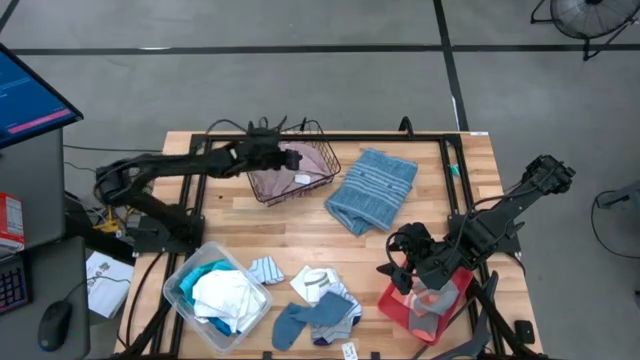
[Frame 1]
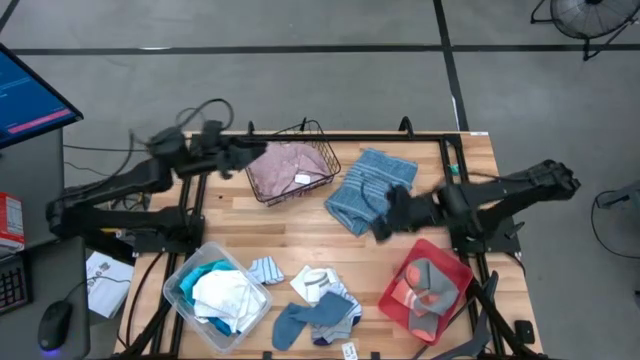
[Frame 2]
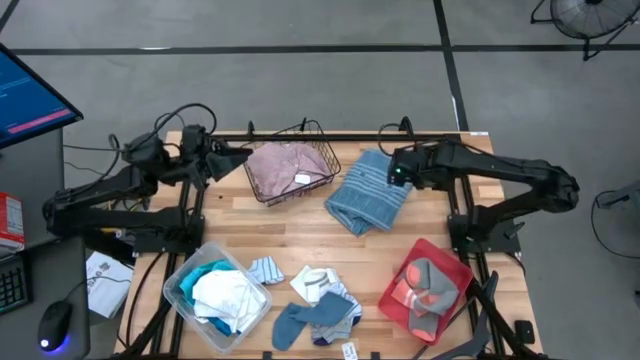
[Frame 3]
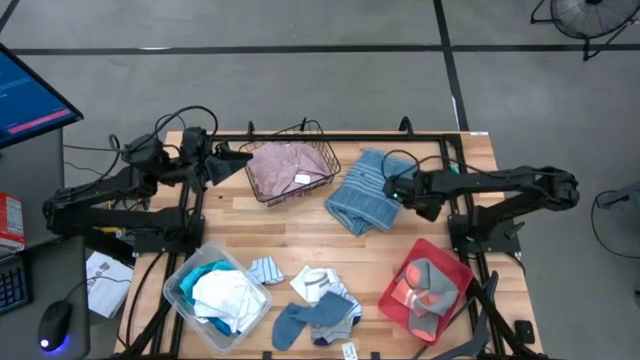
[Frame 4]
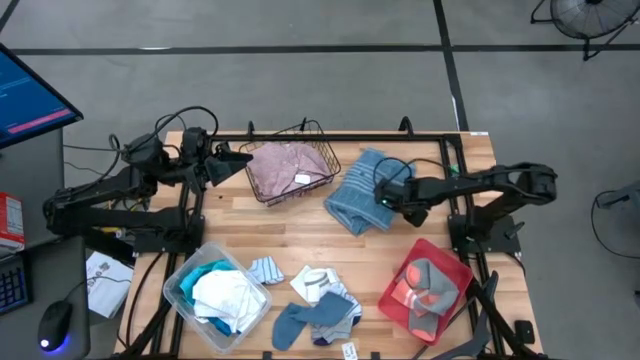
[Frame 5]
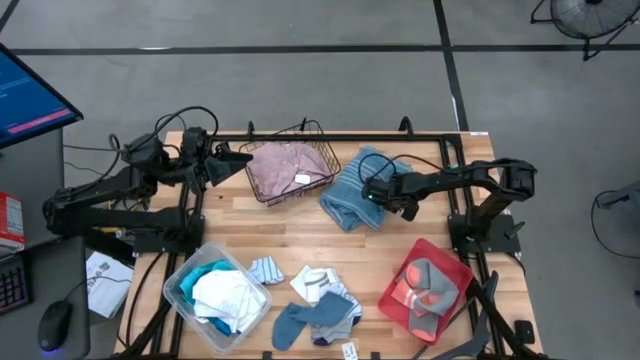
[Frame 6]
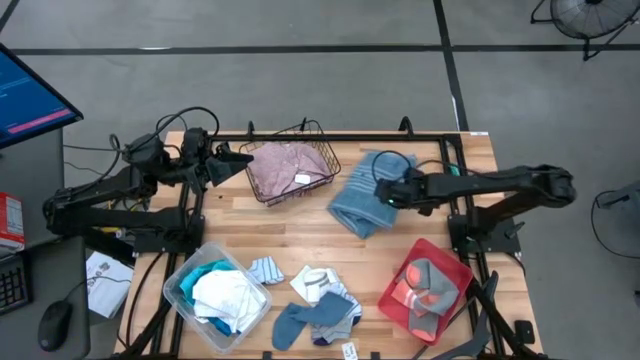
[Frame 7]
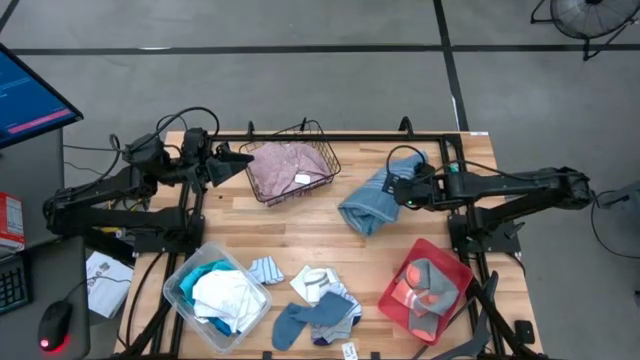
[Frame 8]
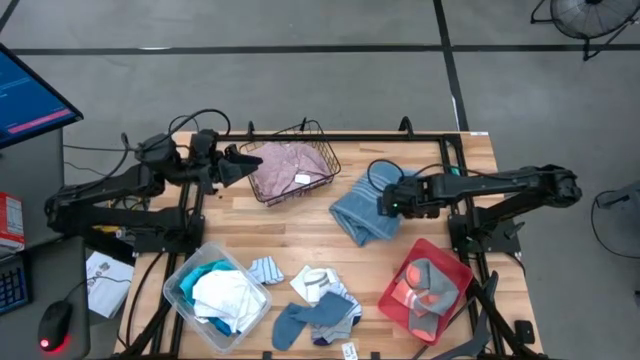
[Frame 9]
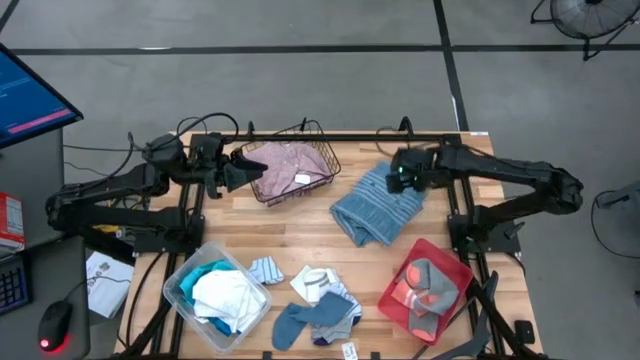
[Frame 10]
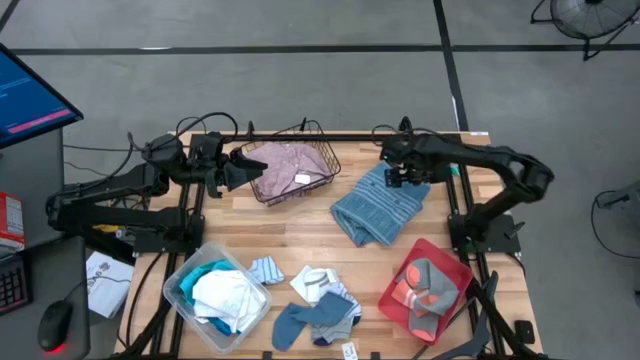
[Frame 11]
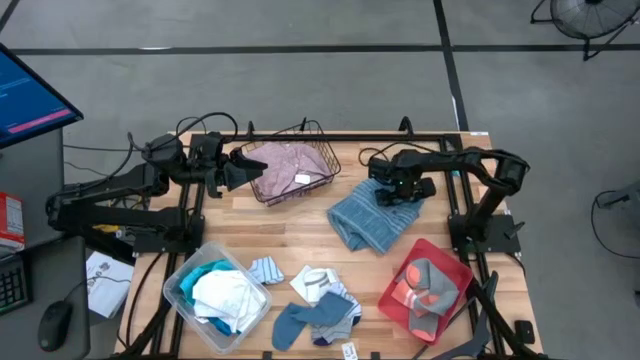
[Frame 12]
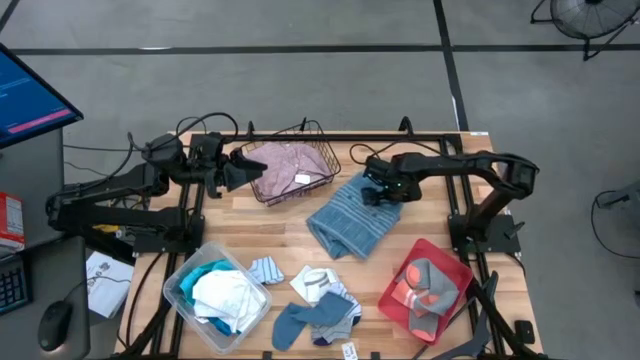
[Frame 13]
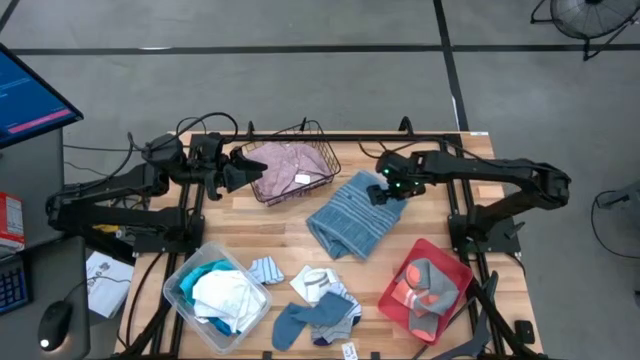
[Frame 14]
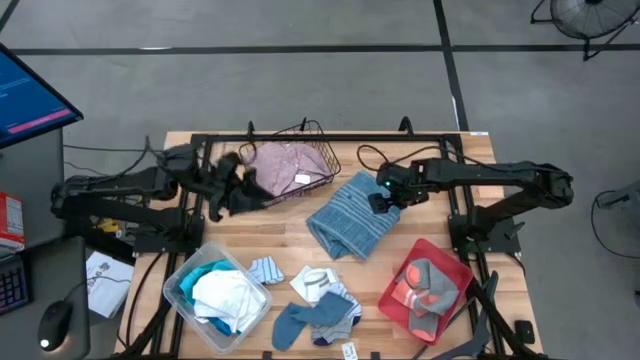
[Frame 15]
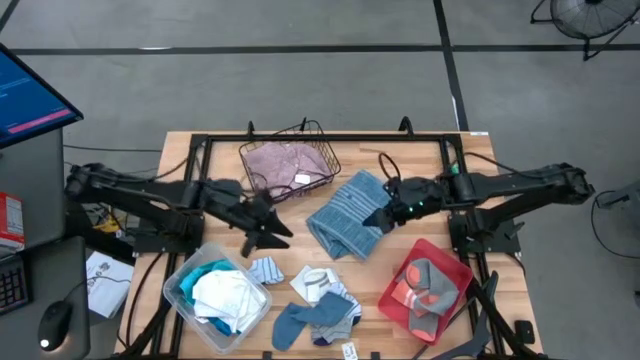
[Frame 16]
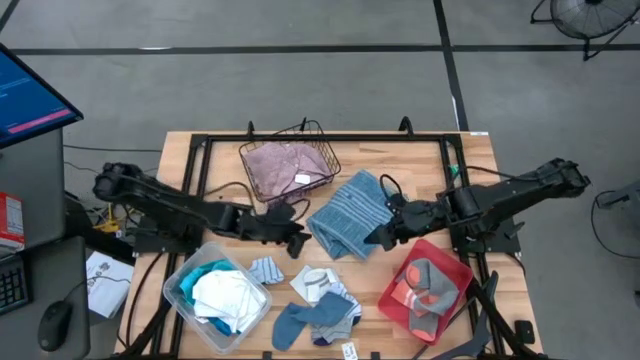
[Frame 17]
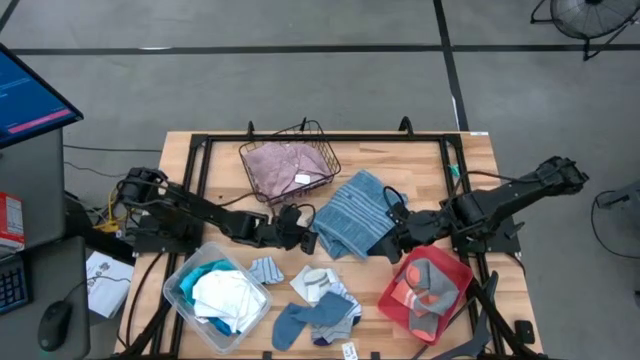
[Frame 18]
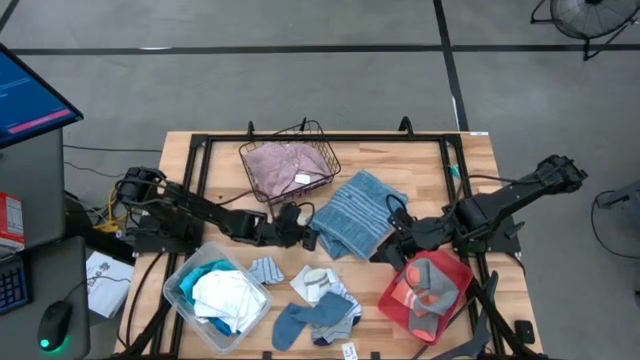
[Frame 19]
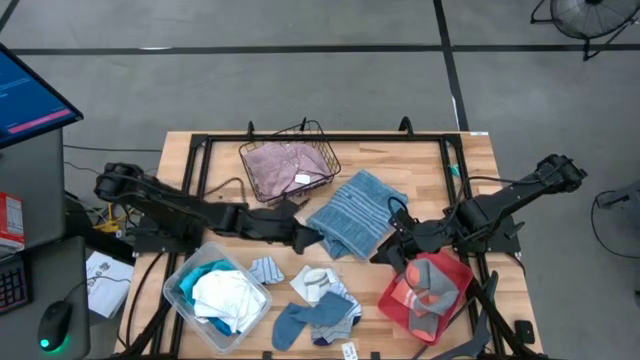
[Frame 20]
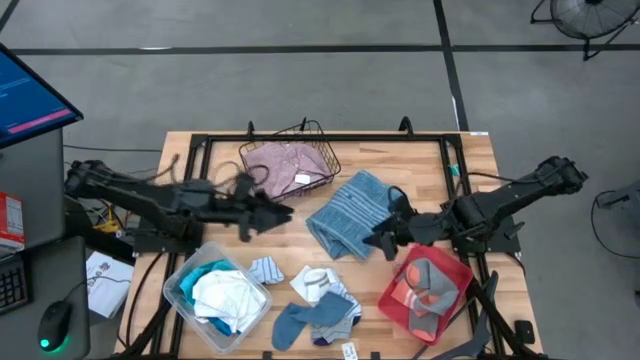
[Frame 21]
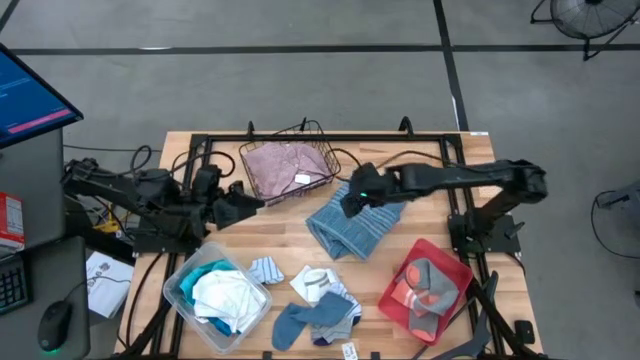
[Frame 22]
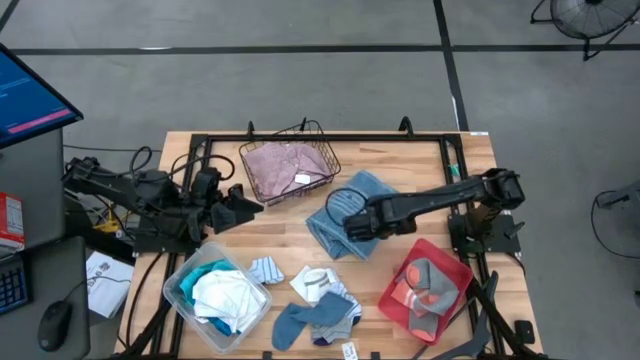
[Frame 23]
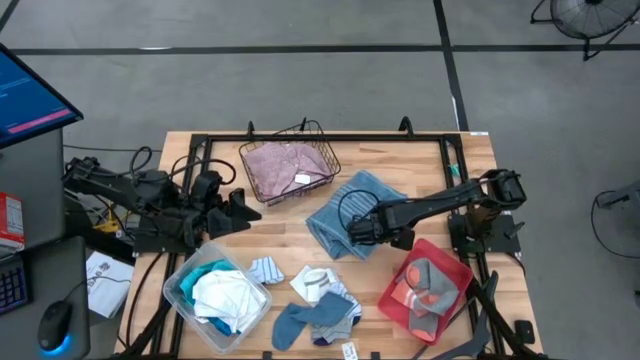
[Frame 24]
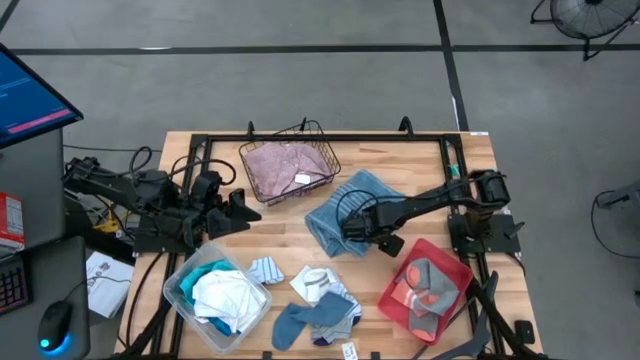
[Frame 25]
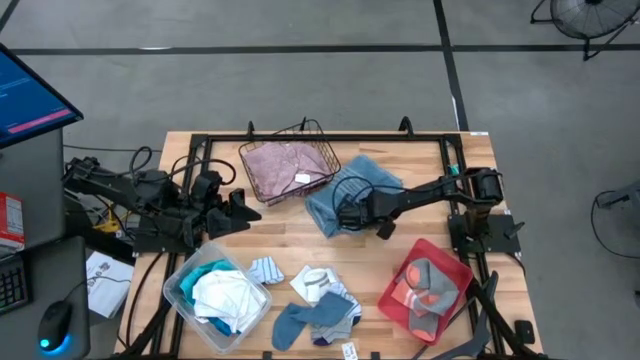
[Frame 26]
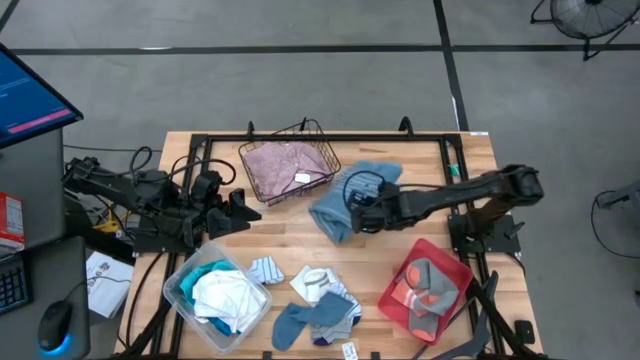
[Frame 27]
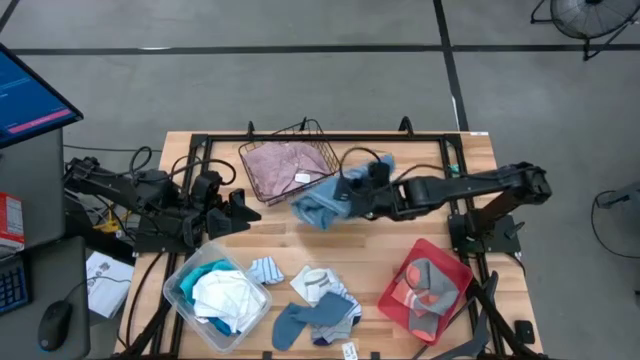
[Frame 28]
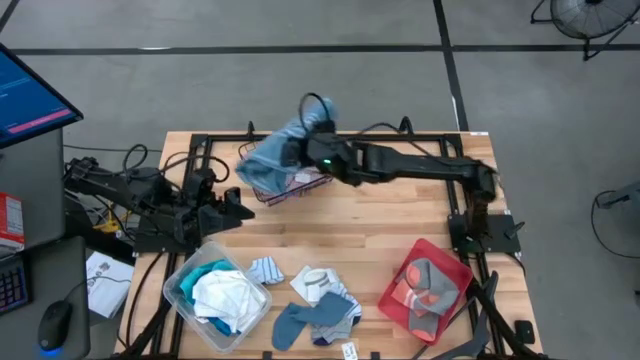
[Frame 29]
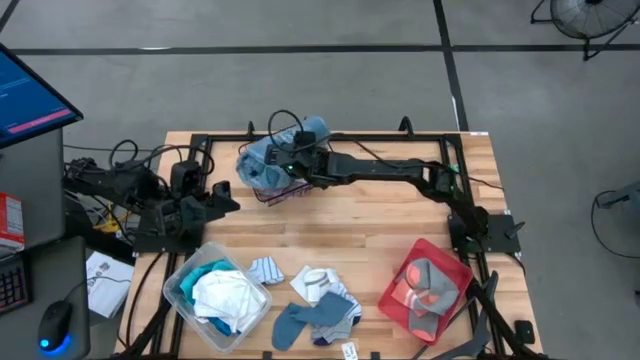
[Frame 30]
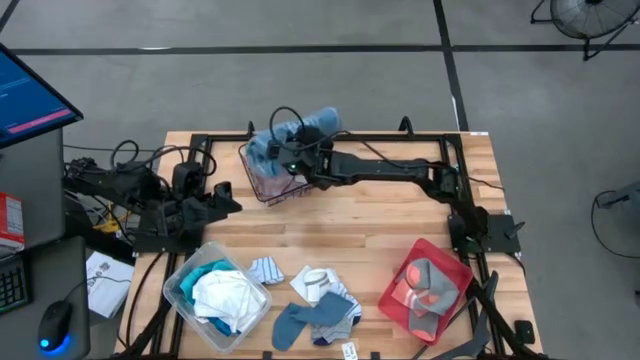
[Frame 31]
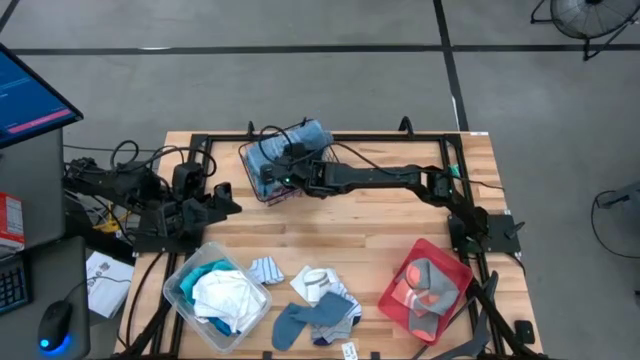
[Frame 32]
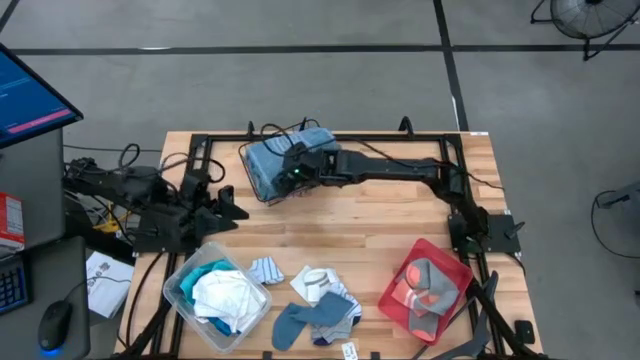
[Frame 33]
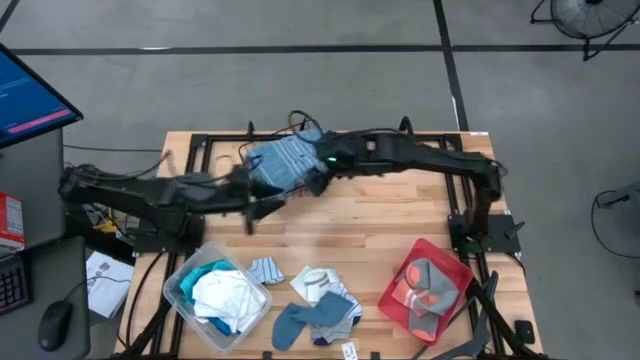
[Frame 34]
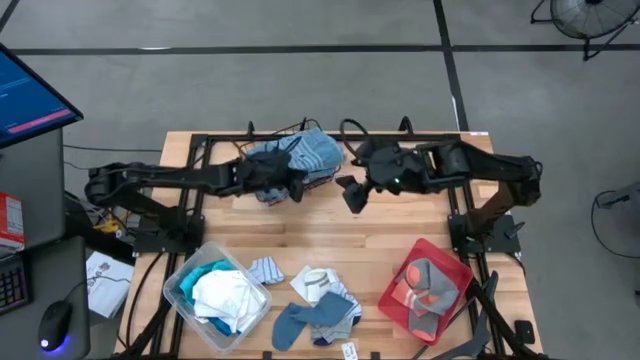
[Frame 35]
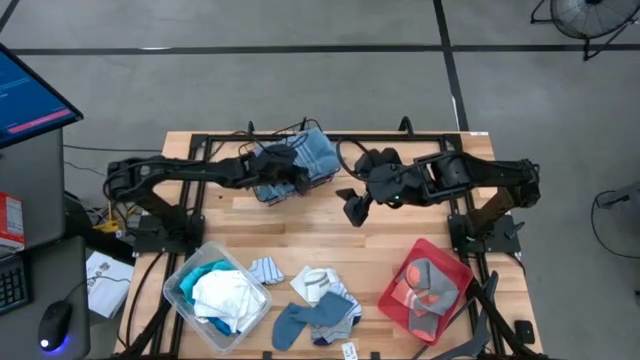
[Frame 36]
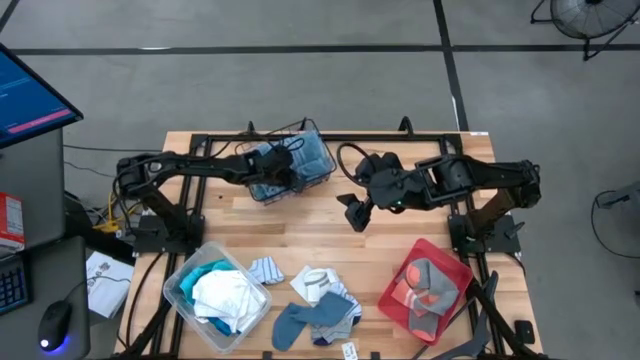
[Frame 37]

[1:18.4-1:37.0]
Task: Pick & Place Cloths
Put the blue polo shirt into the black mesh basket

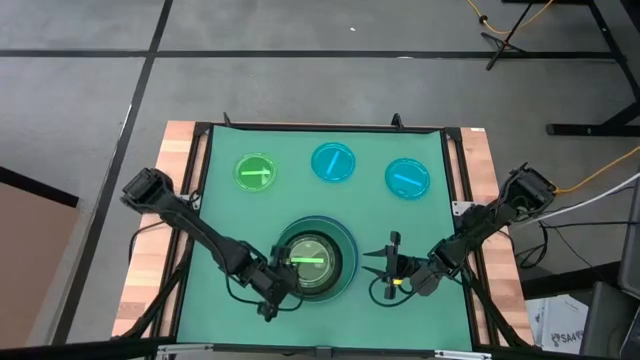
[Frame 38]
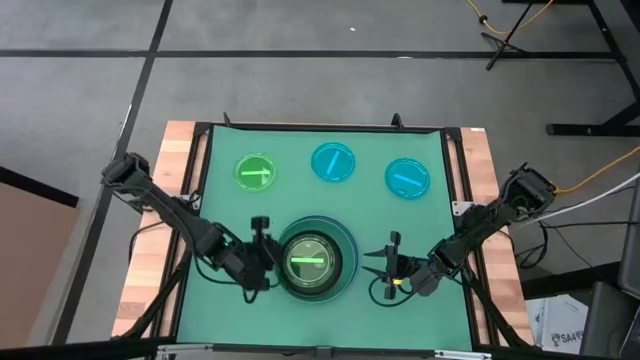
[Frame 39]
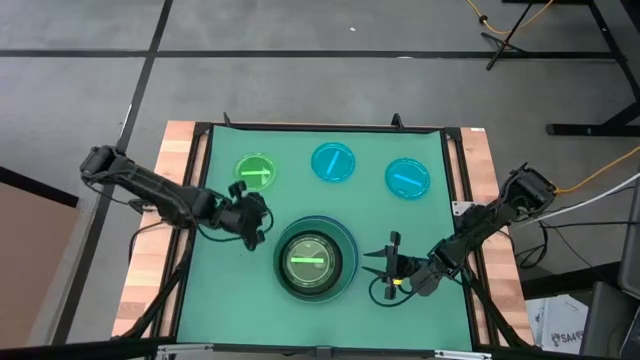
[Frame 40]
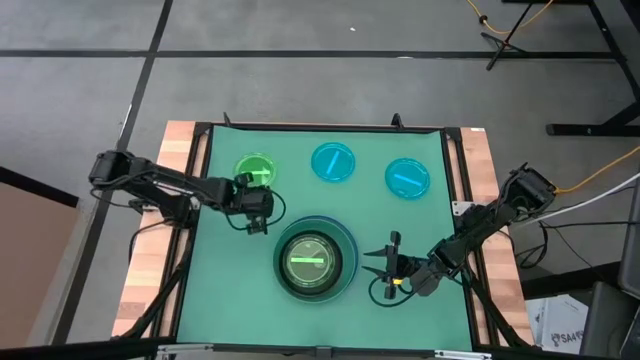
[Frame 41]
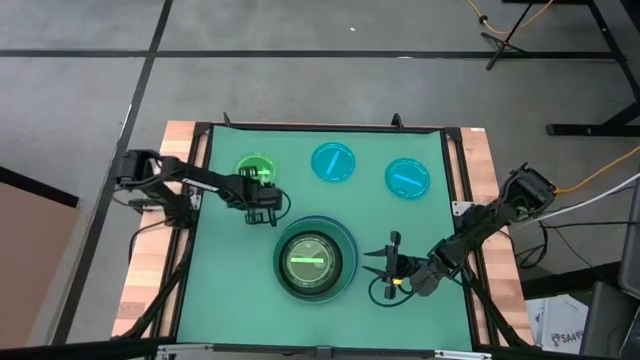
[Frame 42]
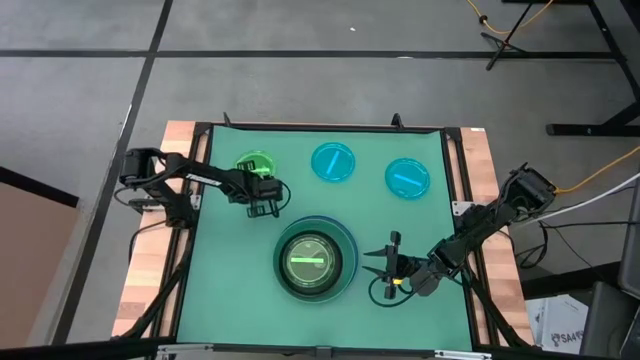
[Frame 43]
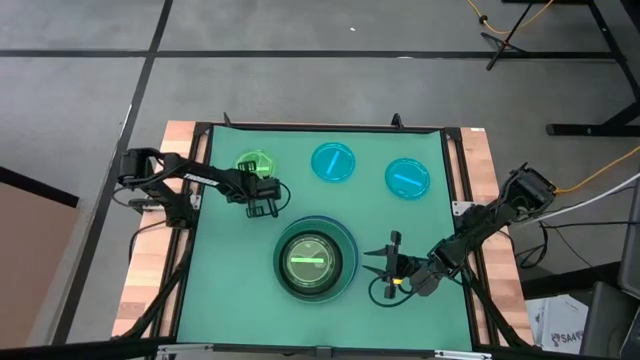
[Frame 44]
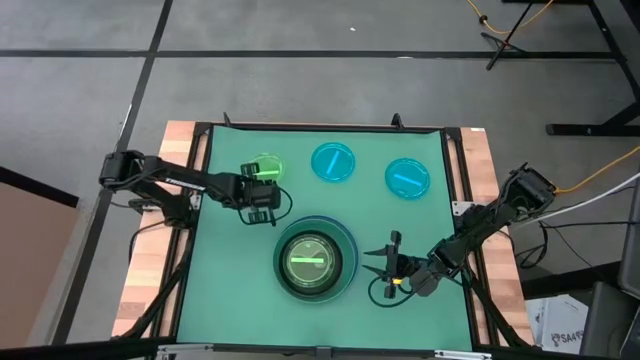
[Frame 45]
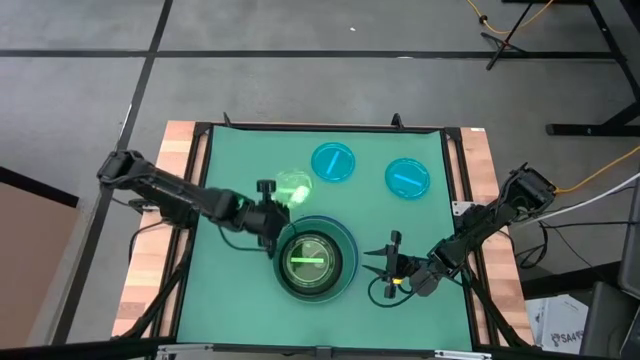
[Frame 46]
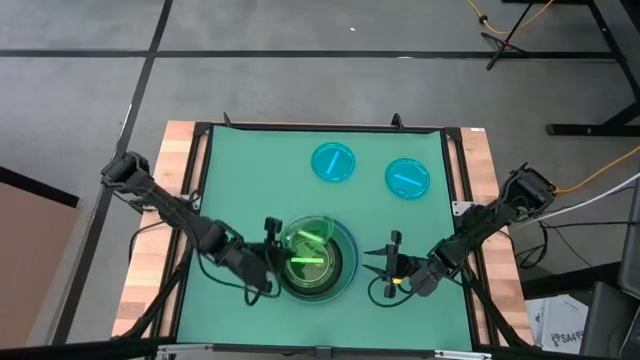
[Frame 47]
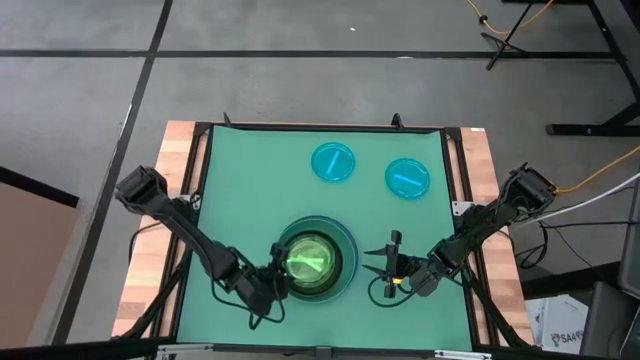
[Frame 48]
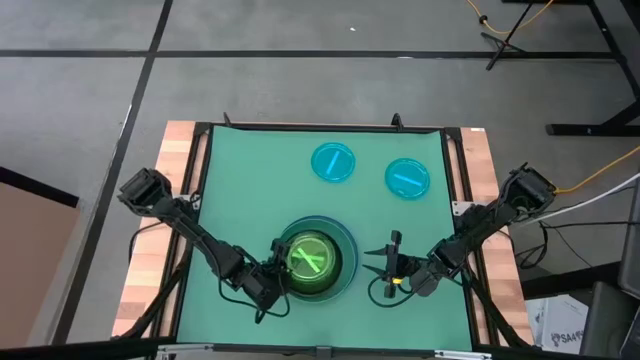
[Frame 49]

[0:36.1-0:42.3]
Task: Stack plastic plates
Stack the green plate on the green plate
